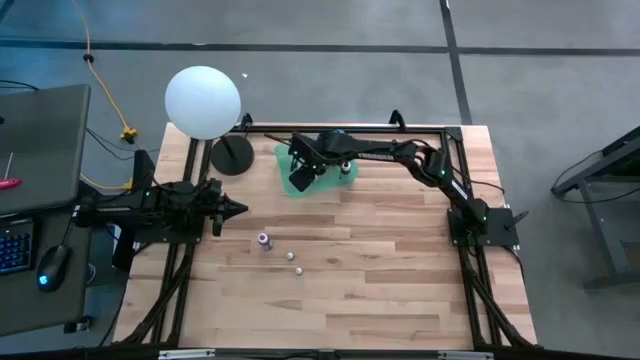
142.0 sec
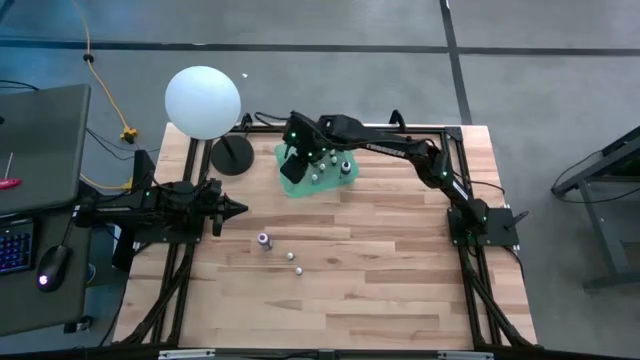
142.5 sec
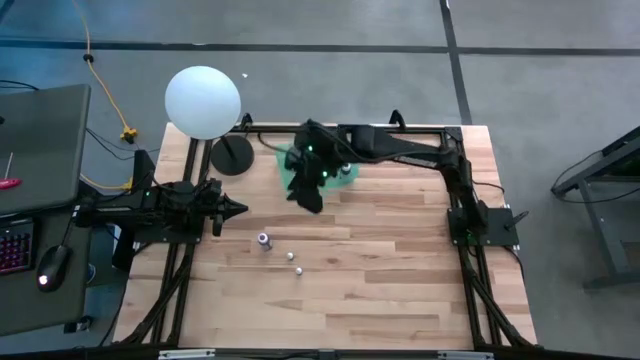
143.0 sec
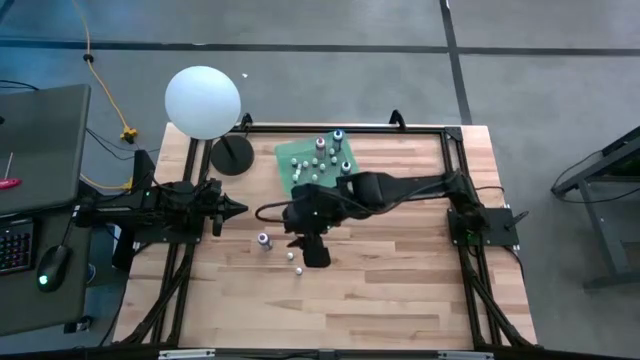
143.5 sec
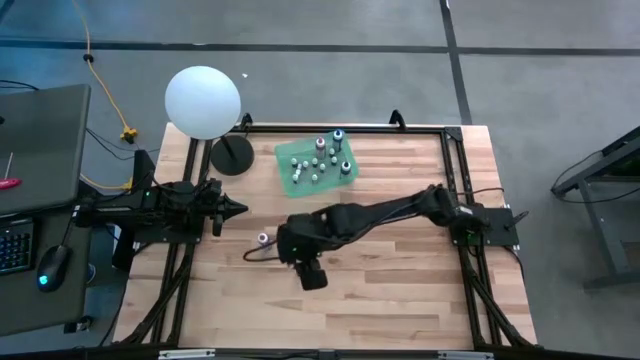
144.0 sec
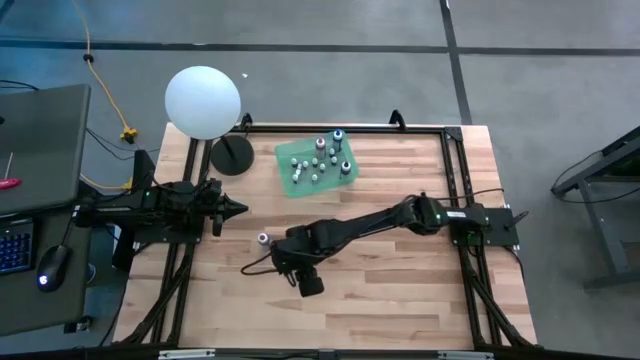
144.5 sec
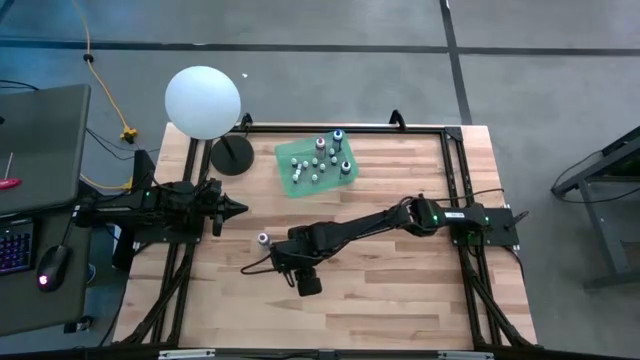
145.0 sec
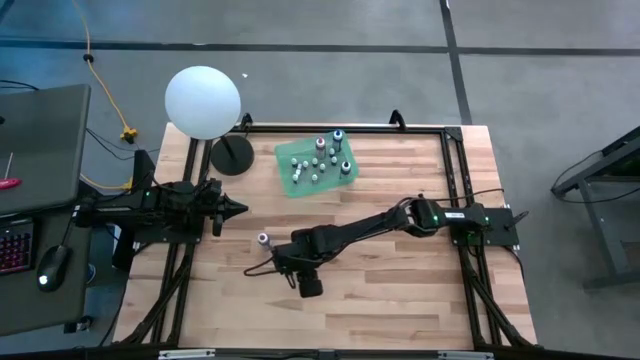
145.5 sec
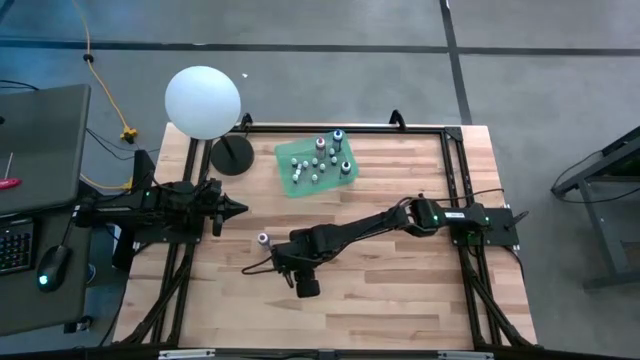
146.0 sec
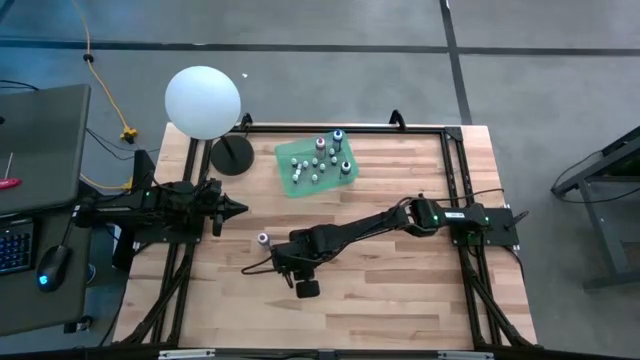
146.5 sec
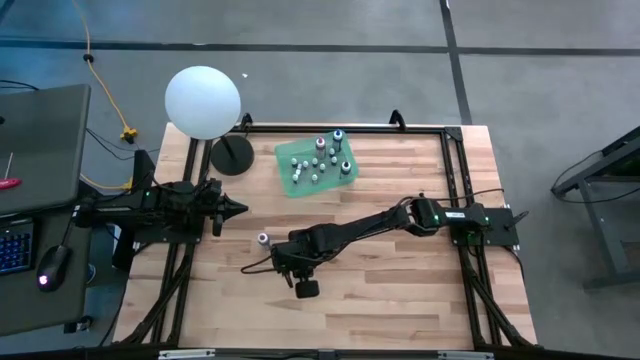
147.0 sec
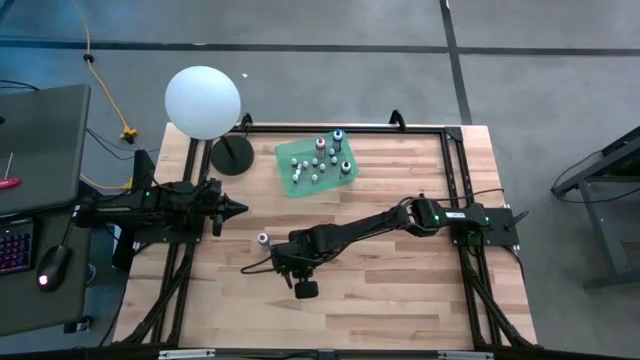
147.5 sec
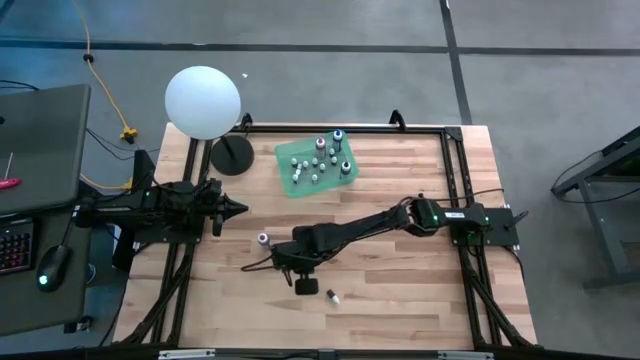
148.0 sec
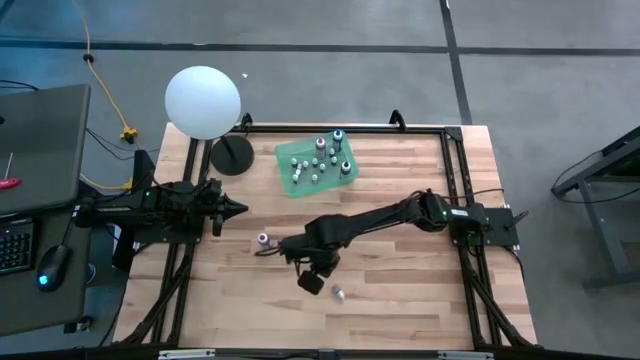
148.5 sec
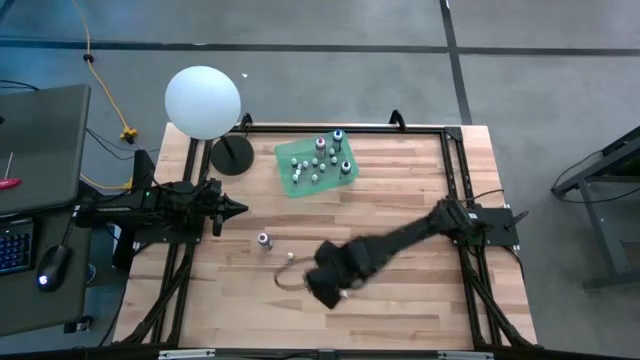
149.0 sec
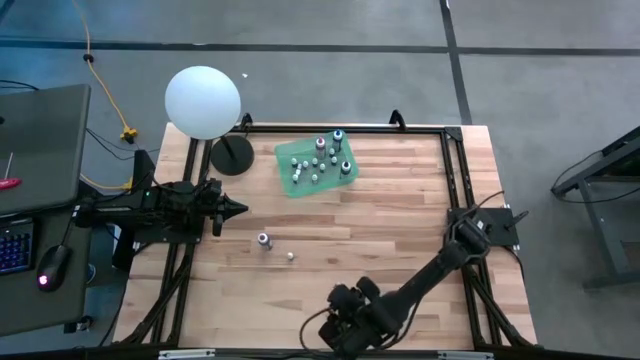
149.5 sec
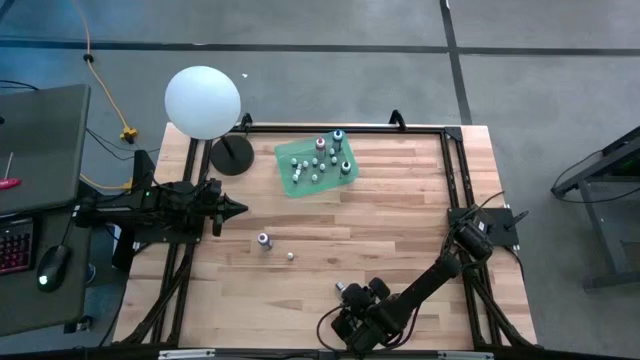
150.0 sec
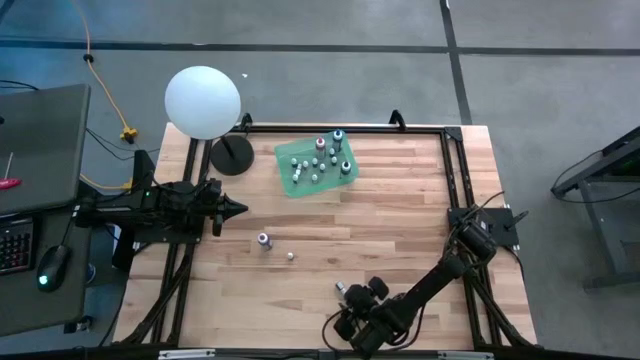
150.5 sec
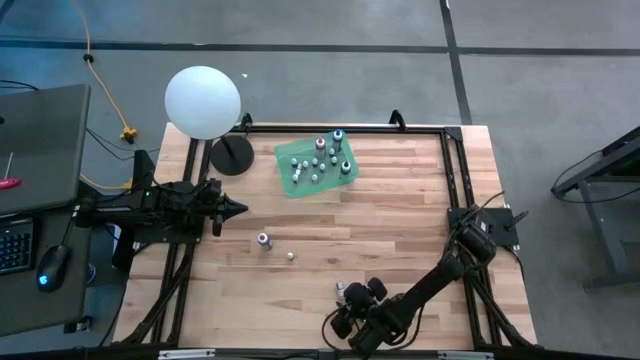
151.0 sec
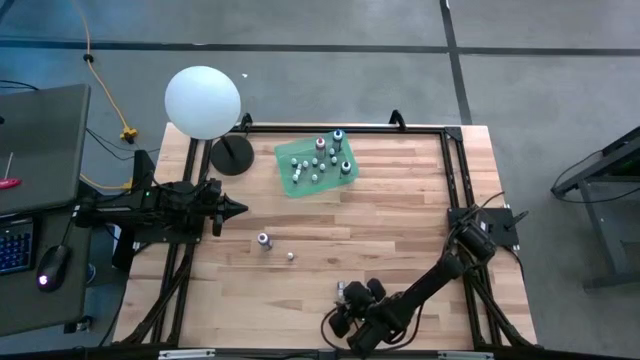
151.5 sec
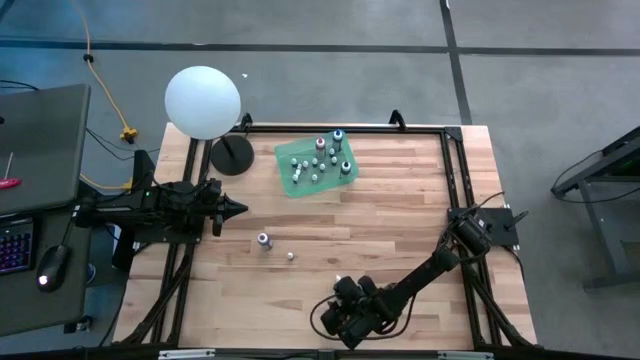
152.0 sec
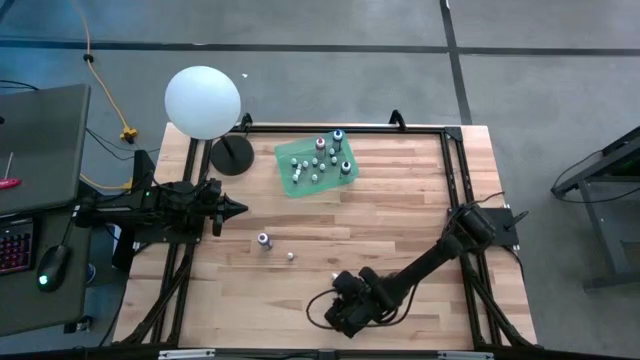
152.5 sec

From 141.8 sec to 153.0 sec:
Task: Pick & Place food coloring
Put the small green dye bottle in the green bin

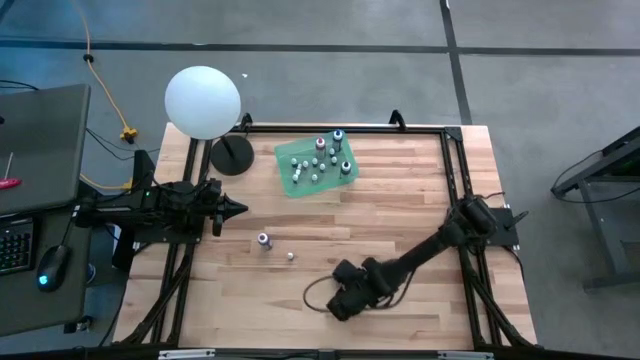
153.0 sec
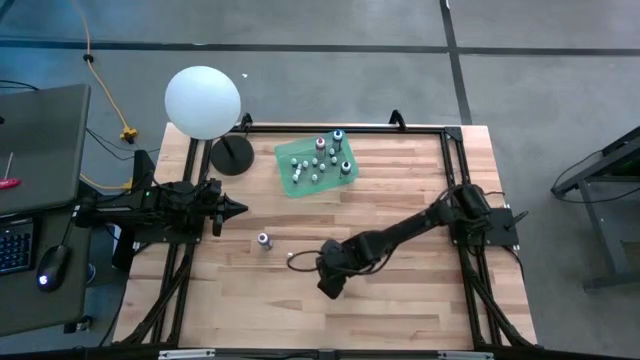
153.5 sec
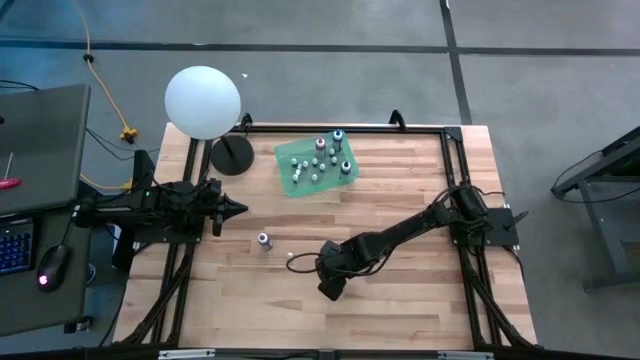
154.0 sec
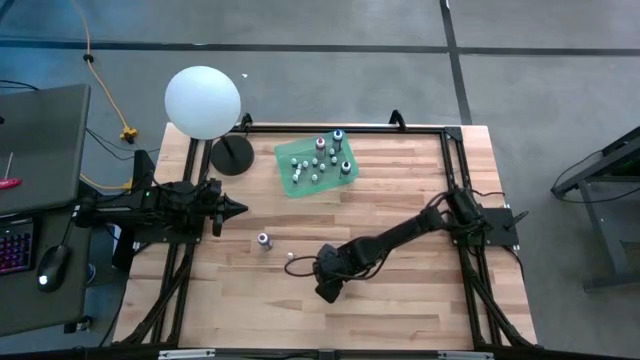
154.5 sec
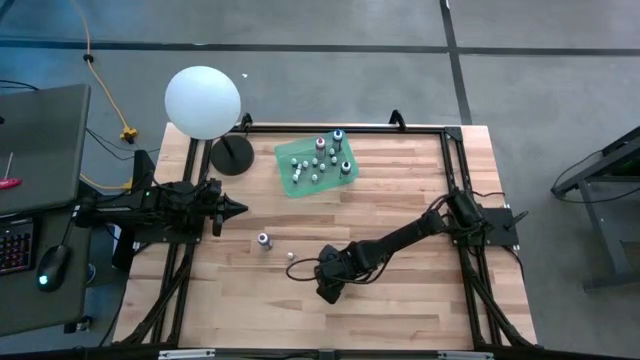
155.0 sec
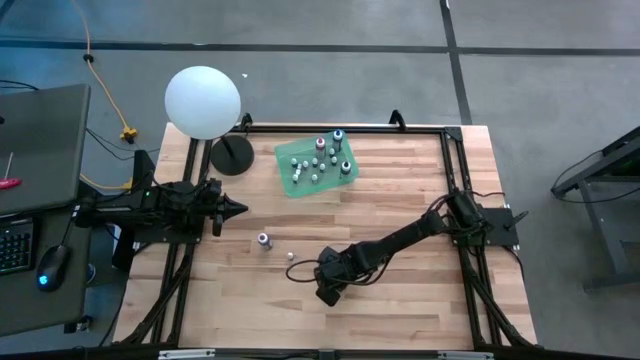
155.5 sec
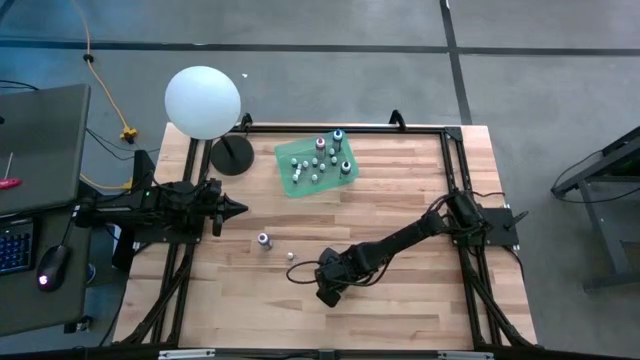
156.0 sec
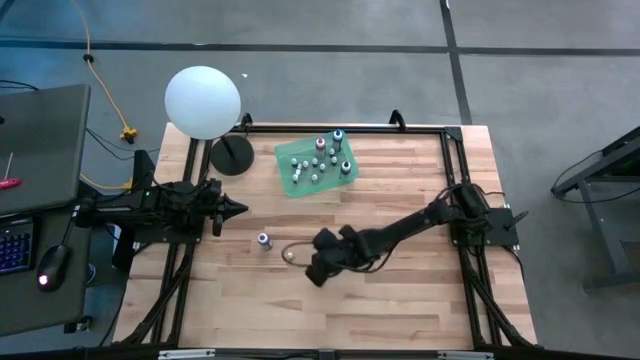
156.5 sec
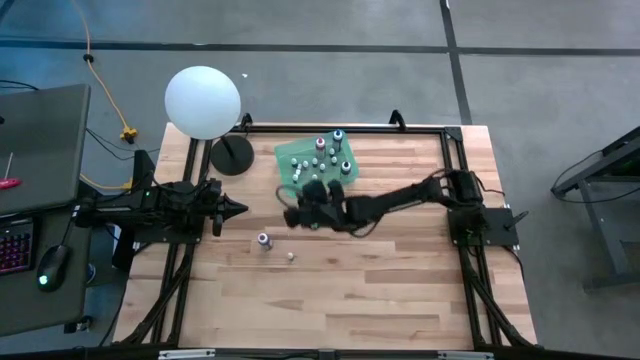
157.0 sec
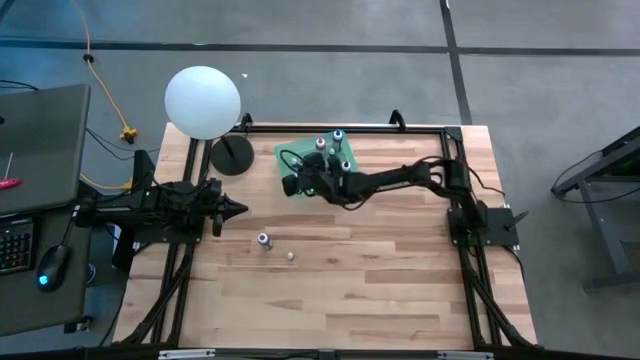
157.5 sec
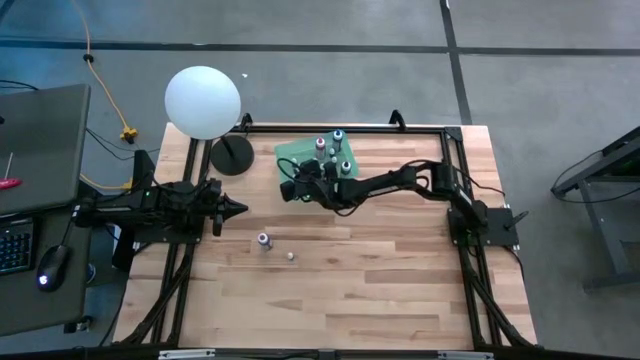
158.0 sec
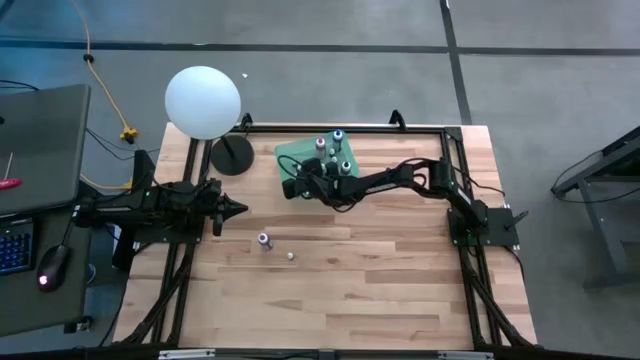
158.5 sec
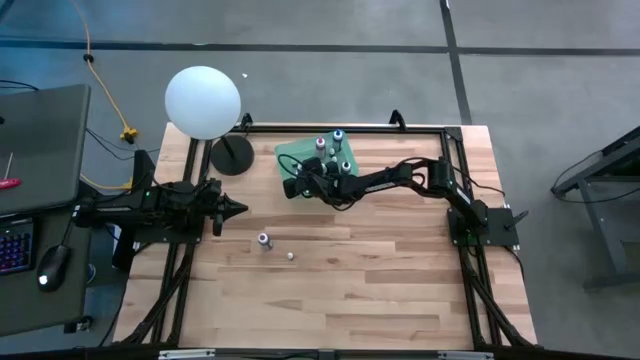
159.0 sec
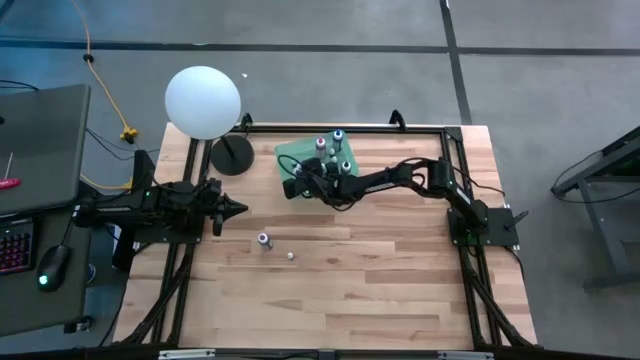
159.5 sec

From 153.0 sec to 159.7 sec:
Put the small green dye bottle in the green bin

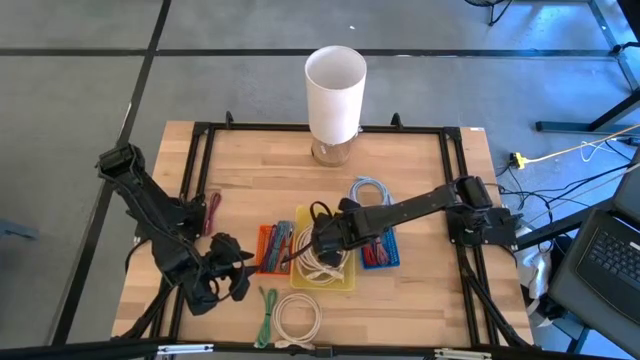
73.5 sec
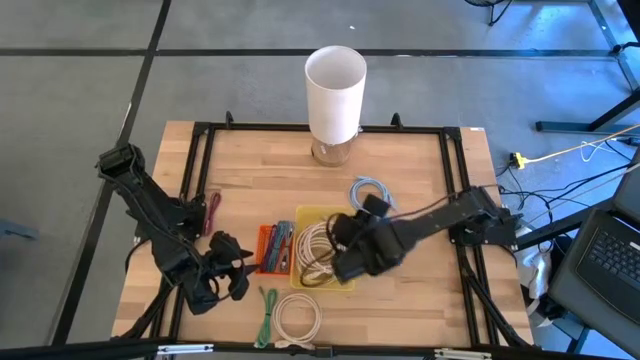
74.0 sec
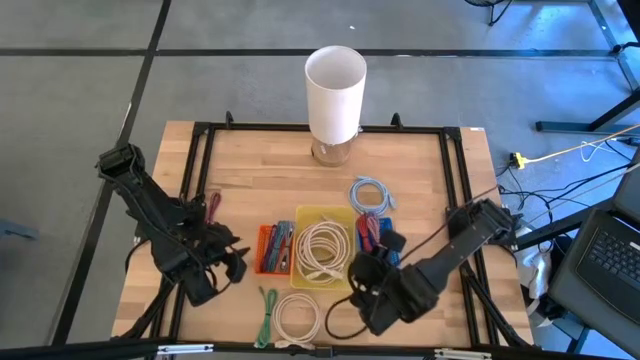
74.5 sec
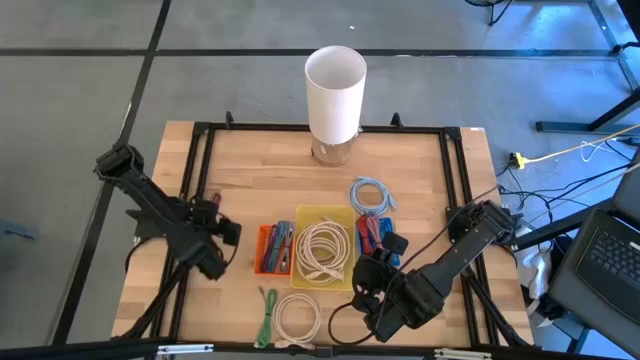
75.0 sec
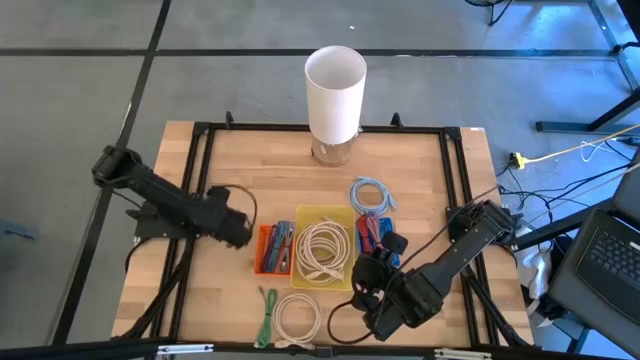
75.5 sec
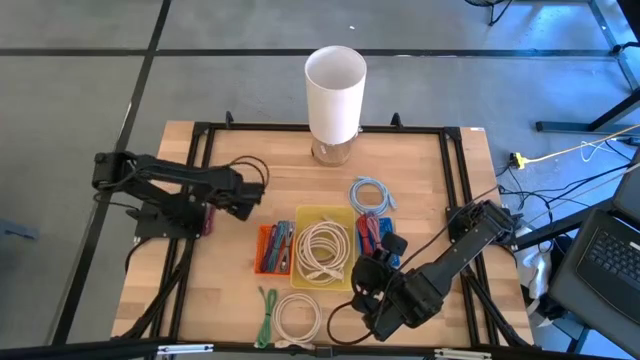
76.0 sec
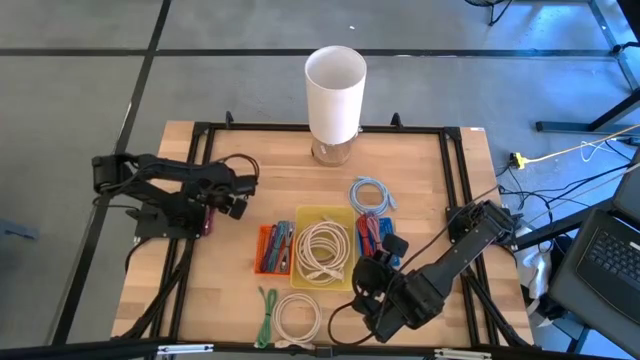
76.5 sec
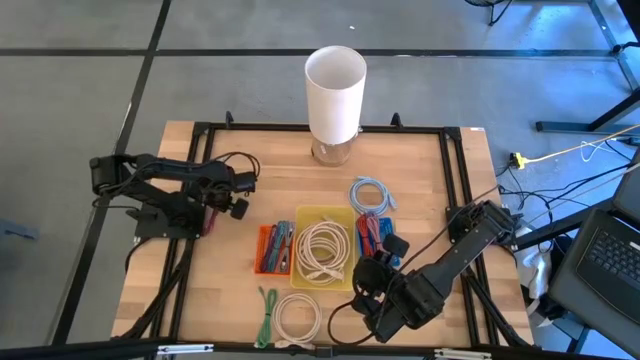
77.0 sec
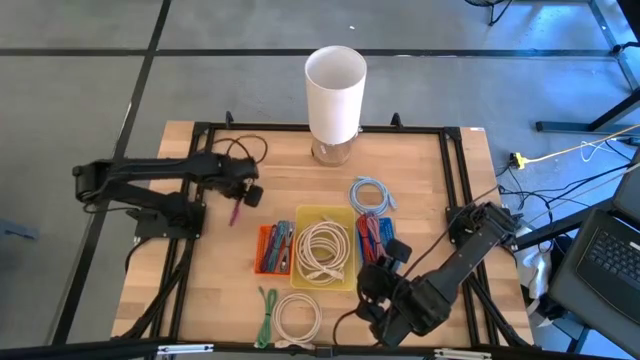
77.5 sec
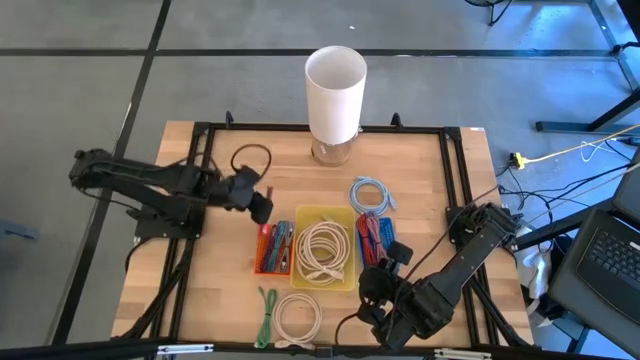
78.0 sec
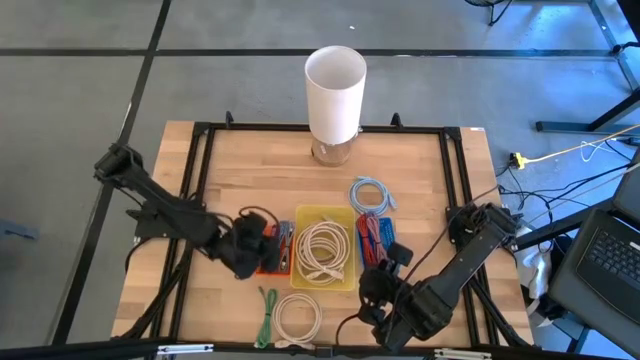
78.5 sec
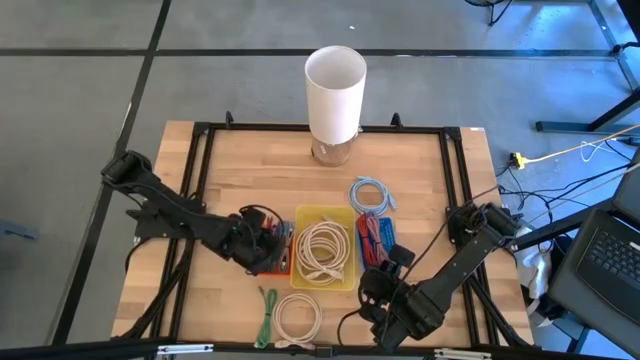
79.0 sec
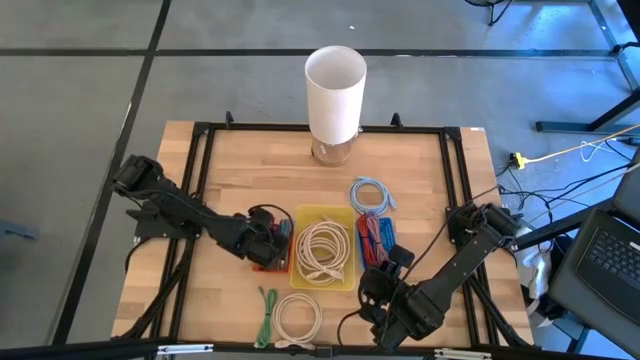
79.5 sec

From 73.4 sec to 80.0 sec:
Task: Pick & Place USB Port
Put the black and pink charger cable into the orange bin
